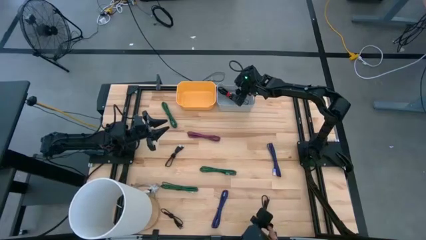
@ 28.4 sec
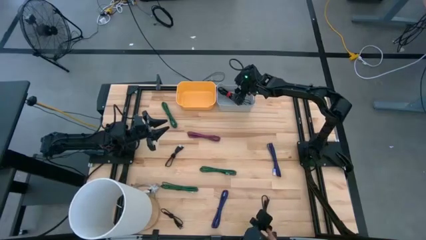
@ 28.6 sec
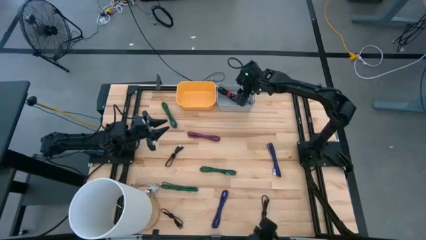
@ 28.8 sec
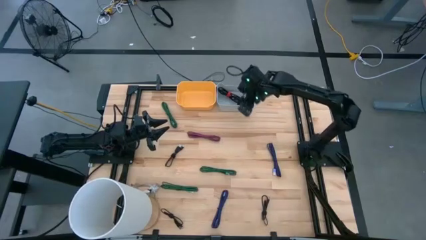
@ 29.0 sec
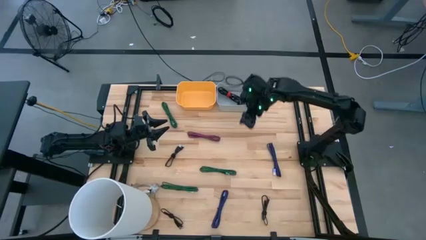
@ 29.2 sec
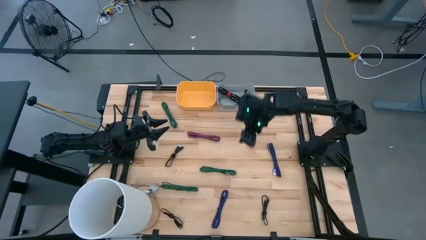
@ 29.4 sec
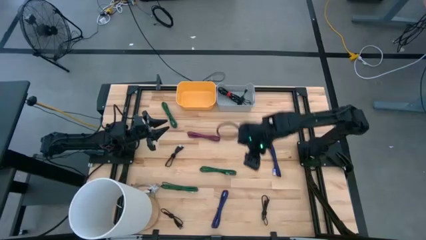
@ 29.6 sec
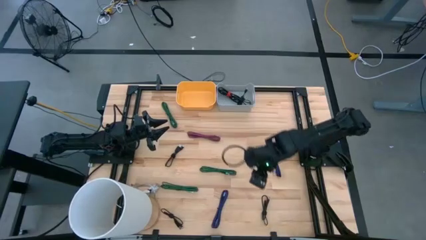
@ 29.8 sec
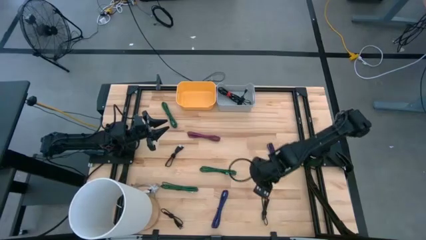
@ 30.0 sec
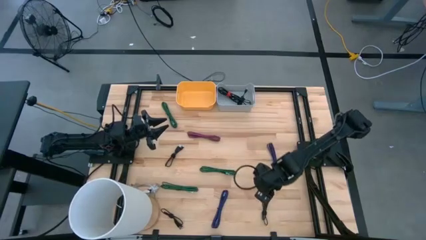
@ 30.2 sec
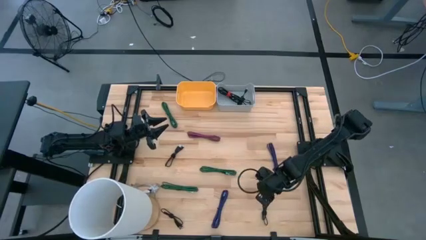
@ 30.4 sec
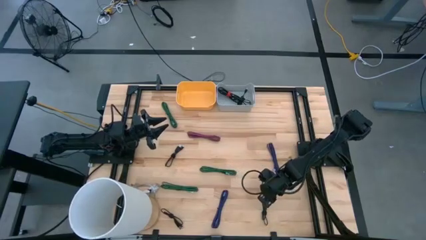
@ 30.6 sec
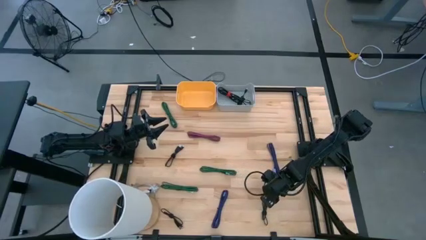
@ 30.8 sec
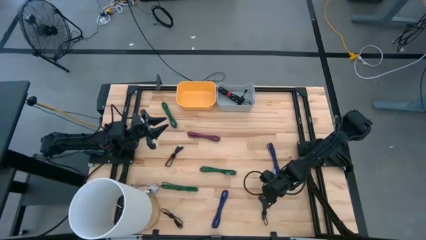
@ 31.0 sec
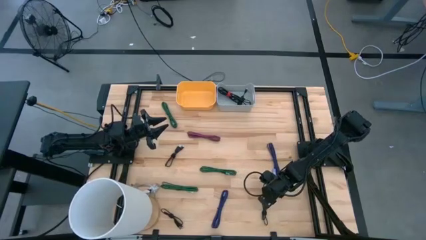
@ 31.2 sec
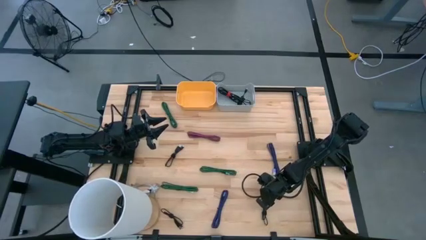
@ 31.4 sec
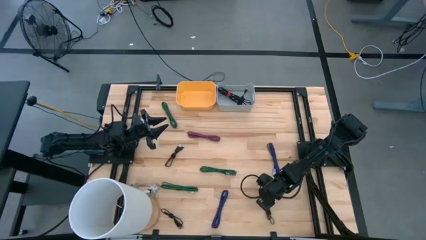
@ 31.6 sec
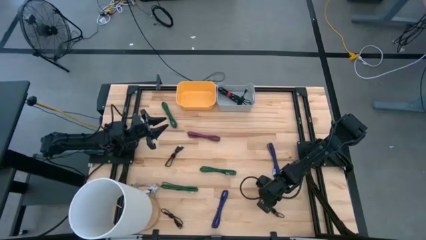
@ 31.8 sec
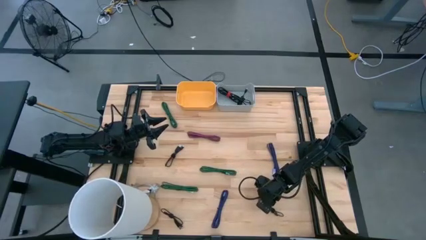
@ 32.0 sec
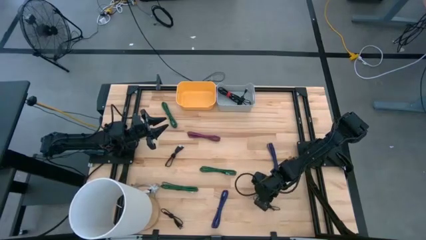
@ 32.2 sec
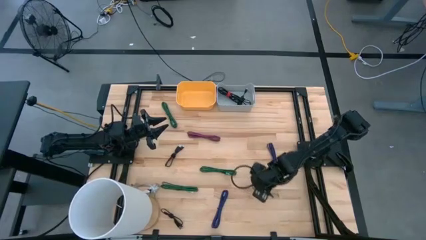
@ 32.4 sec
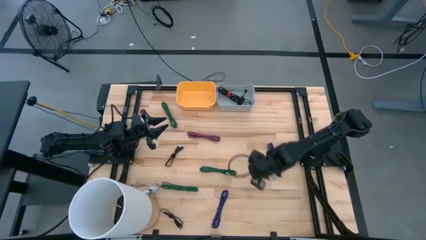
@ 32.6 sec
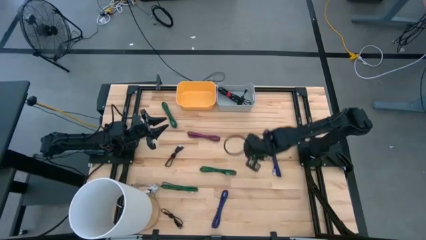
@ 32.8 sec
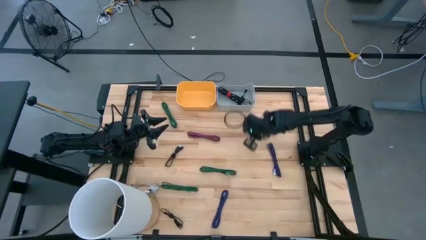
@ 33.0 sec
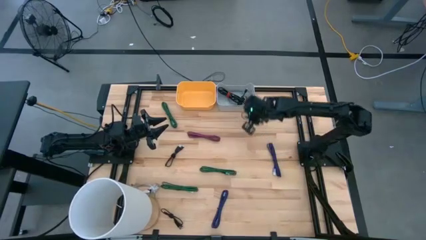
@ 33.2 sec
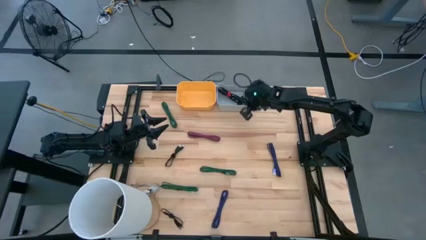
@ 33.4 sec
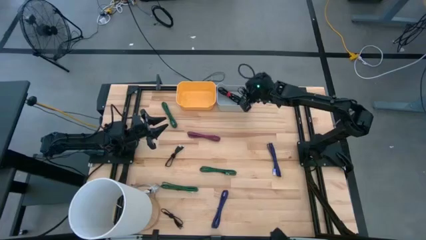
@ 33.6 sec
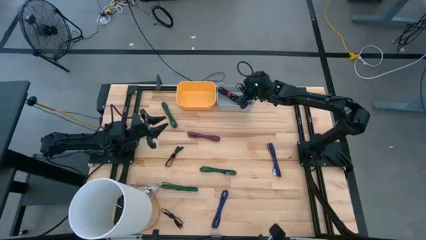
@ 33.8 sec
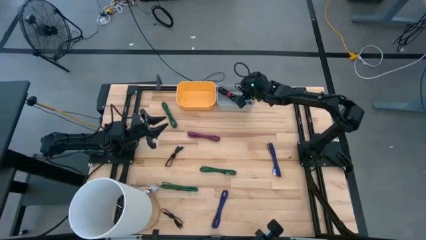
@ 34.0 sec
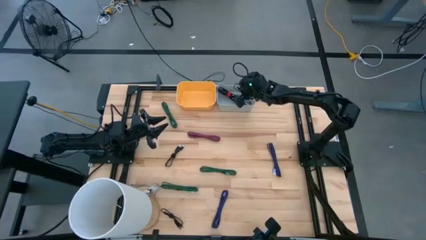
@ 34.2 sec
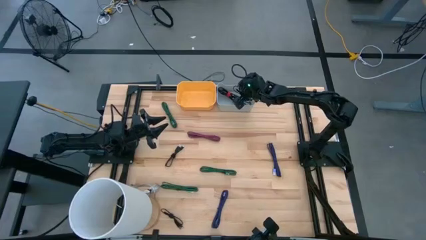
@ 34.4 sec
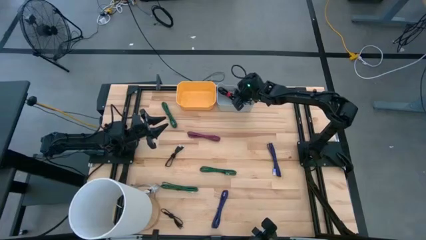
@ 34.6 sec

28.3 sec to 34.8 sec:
Task: Pick & Place USB Port
Put the black charger cable into the gray bin

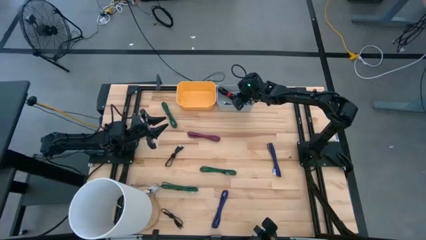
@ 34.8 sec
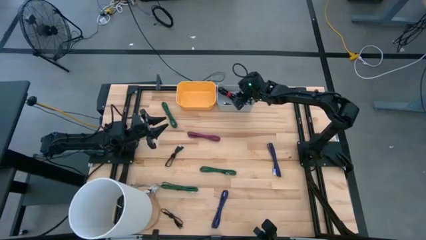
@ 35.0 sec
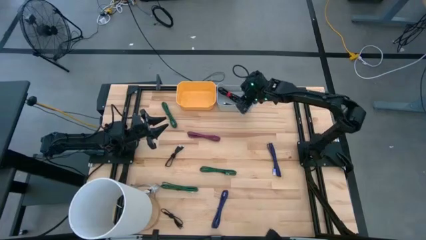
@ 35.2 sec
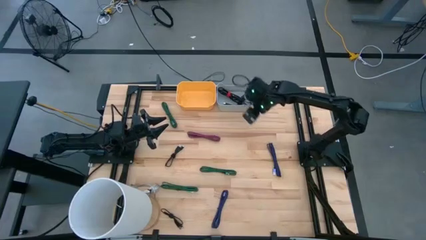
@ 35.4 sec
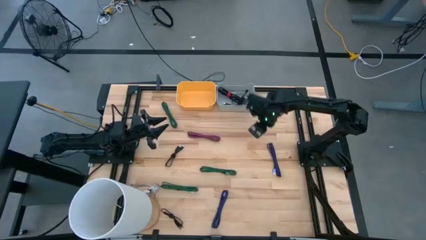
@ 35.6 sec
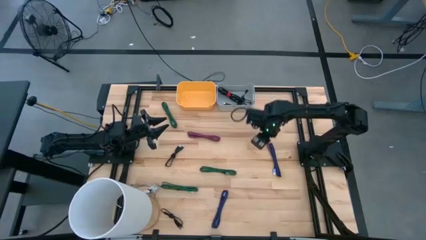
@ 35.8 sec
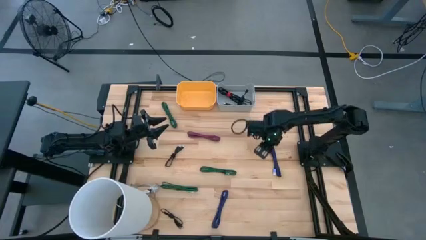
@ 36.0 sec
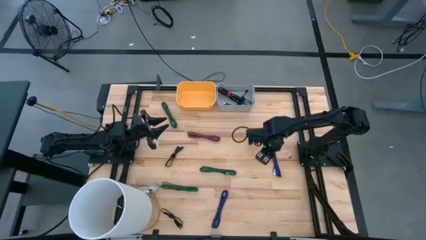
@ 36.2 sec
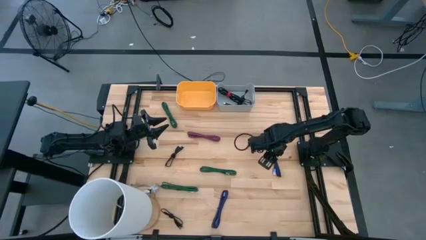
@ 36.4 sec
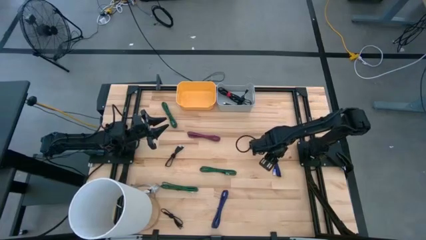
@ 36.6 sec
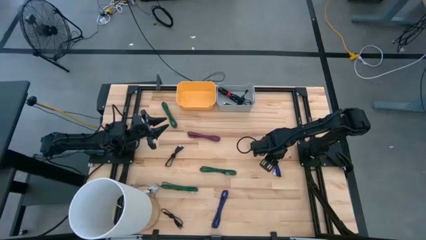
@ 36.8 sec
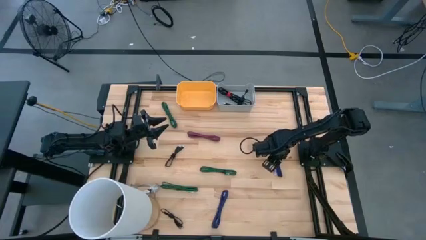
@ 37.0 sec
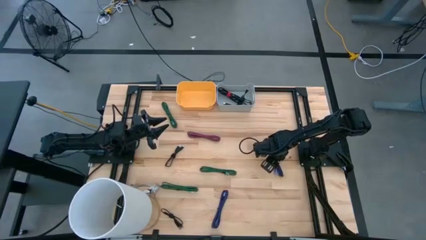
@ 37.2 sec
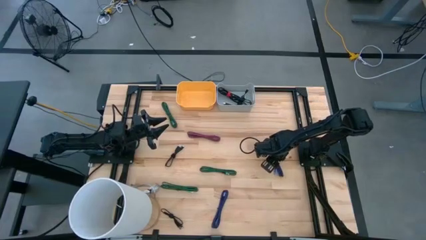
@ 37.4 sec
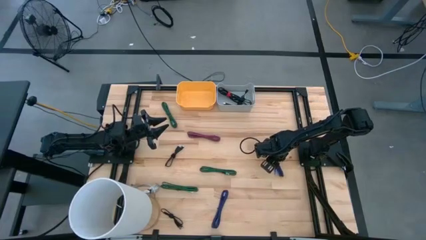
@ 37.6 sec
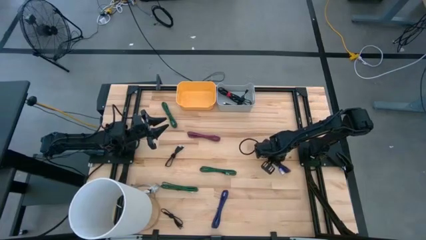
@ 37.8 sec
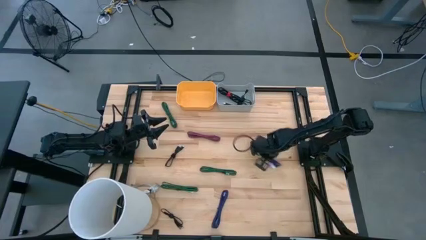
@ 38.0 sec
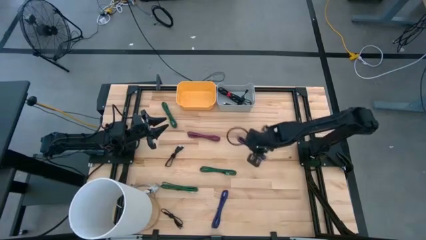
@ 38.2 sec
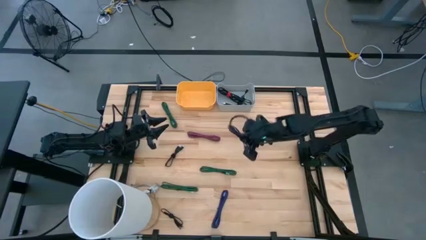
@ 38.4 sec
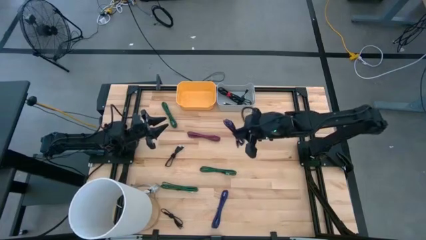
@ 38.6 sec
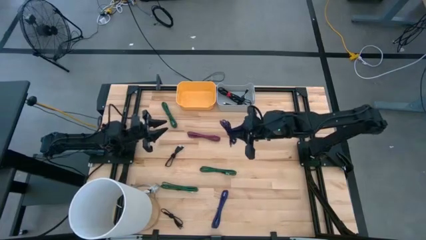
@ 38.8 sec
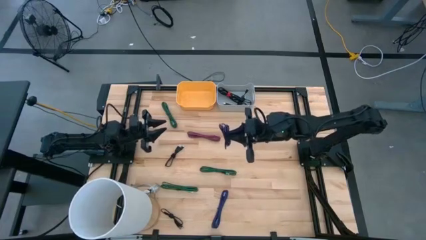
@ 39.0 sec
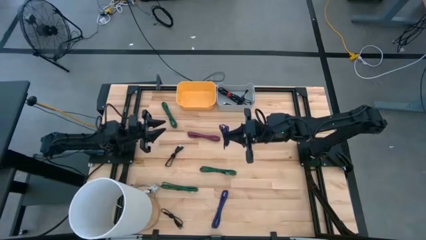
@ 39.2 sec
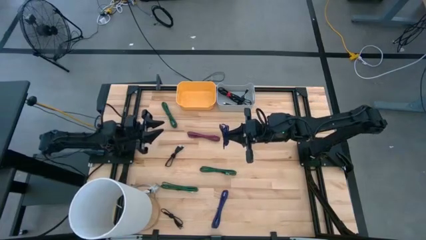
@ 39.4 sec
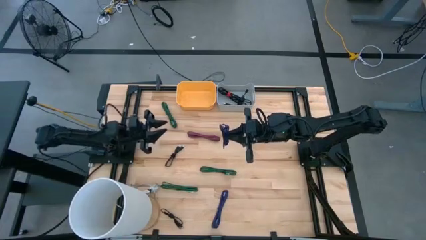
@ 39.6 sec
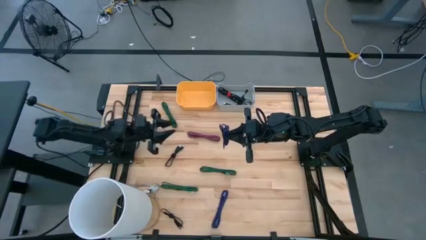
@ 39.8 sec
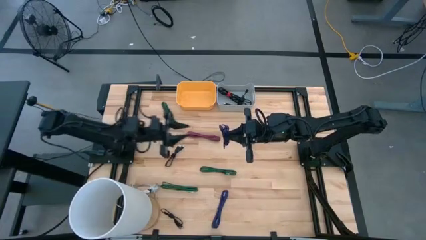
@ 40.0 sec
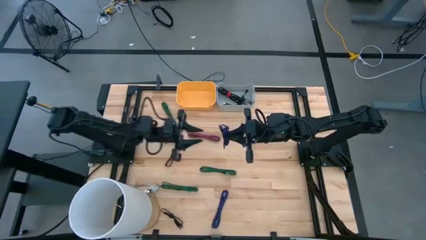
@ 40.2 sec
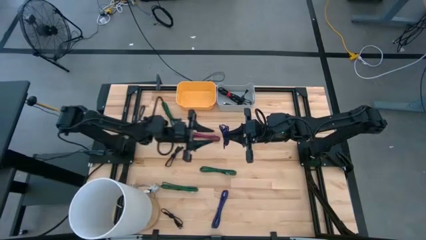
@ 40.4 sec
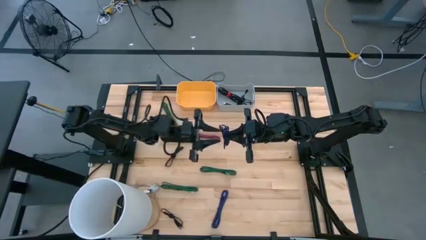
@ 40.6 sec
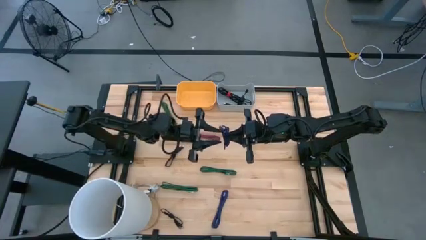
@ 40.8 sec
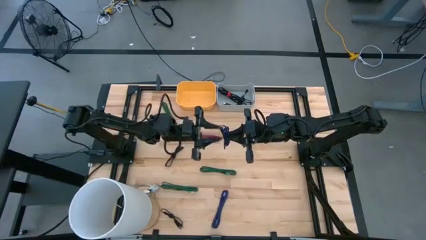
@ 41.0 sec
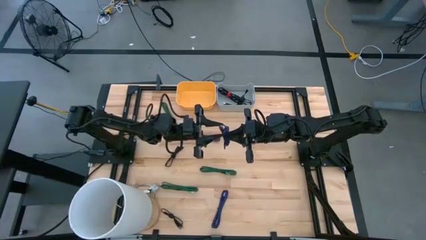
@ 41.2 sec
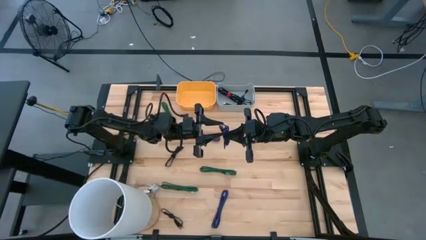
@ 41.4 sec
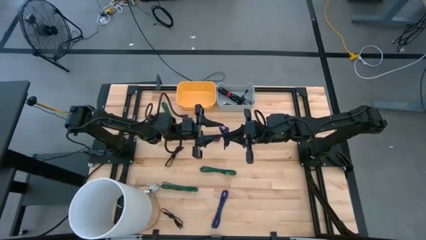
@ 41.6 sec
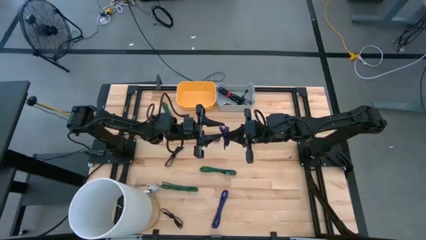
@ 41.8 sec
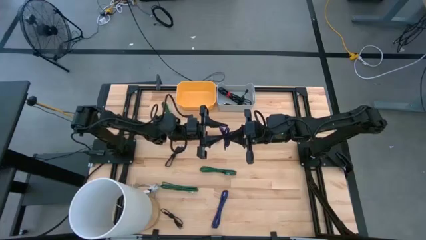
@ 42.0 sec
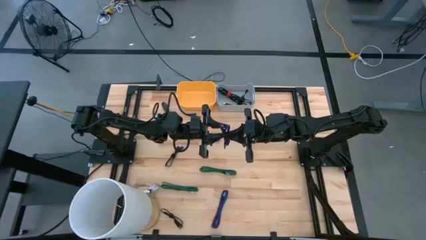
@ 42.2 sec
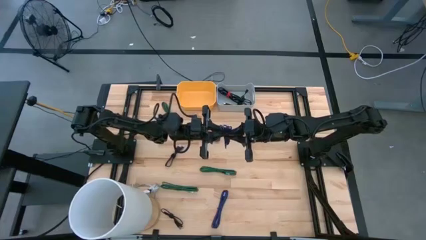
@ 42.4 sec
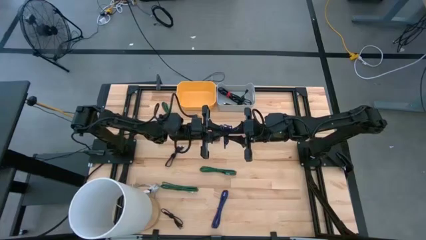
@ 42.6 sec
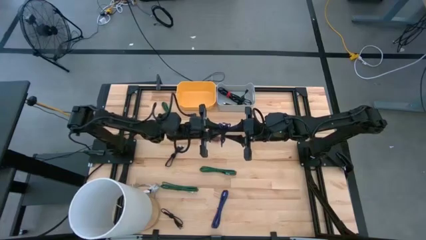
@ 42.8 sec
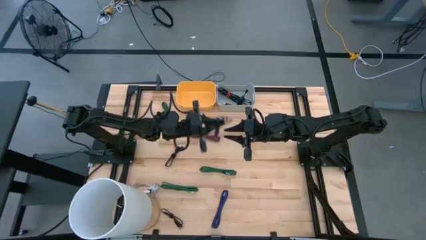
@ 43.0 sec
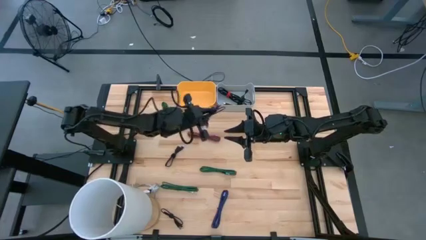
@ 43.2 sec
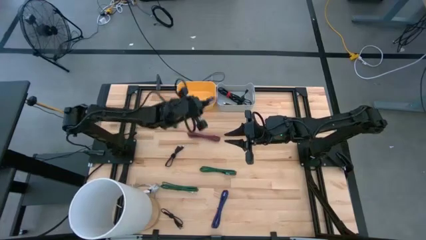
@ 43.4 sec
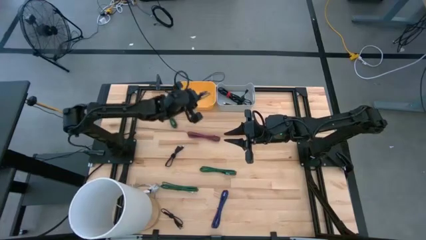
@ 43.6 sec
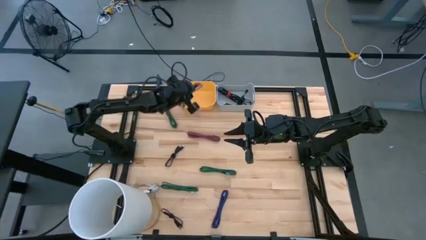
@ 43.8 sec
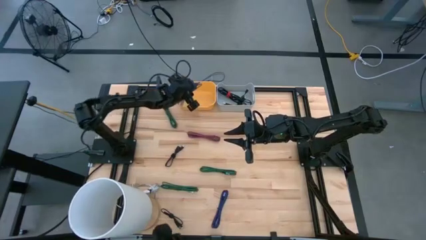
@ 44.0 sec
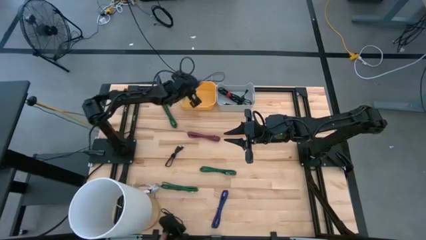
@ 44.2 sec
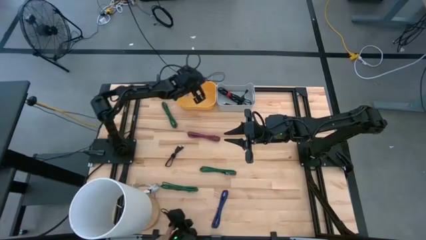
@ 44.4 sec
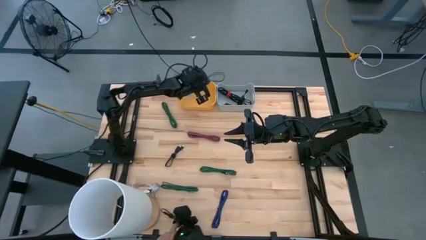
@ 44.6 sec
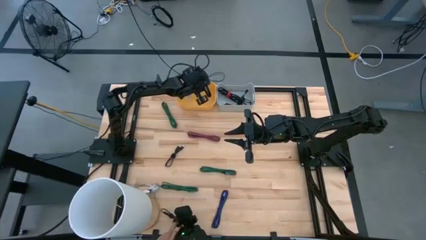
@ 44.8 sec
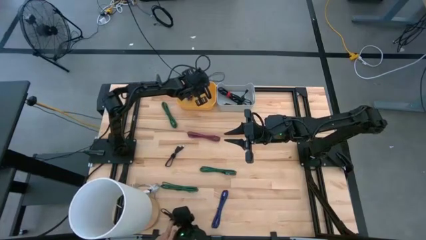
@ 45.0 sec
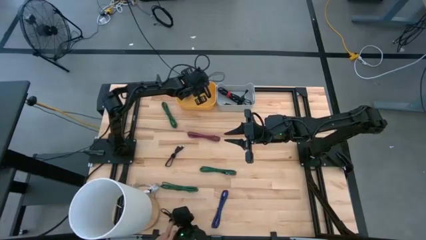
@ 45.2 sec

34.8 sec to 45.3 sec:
Put the violet black charger cable into the yellow bin
